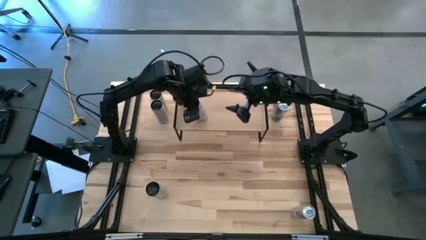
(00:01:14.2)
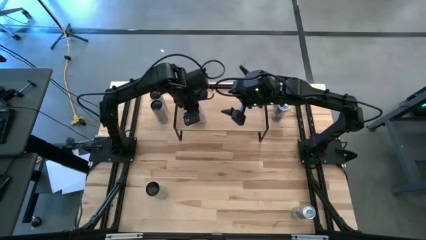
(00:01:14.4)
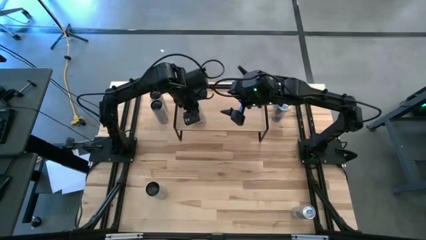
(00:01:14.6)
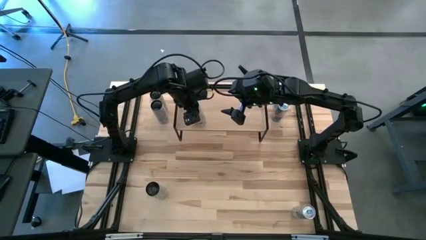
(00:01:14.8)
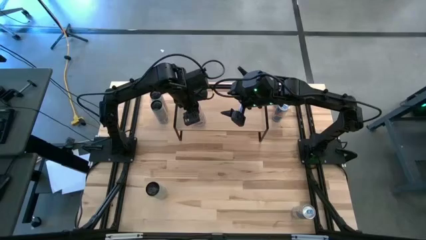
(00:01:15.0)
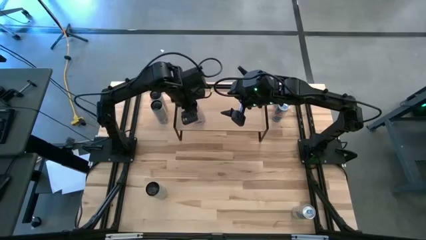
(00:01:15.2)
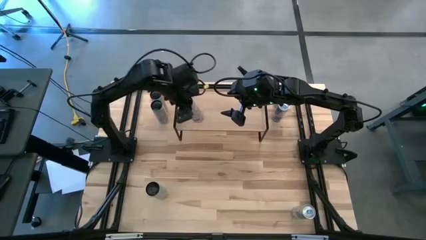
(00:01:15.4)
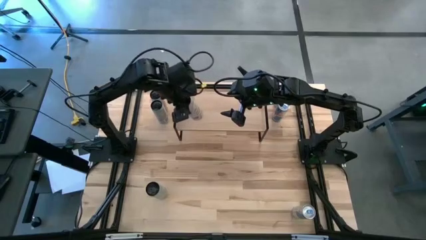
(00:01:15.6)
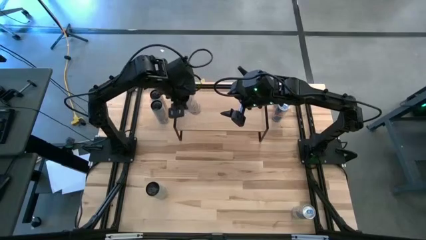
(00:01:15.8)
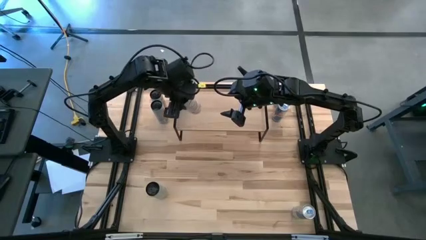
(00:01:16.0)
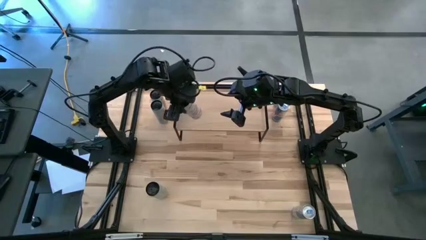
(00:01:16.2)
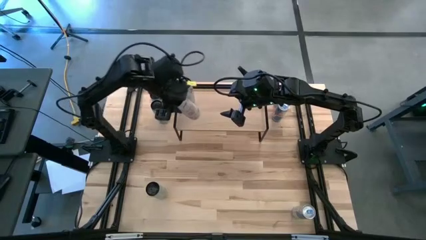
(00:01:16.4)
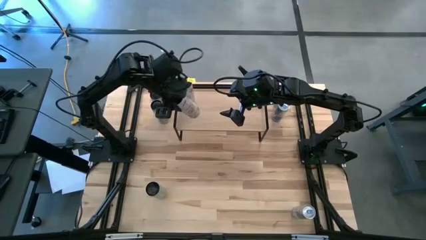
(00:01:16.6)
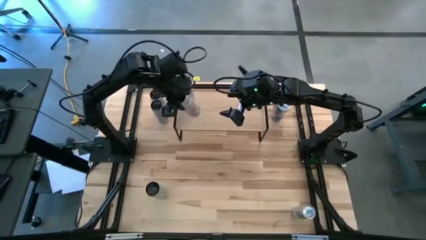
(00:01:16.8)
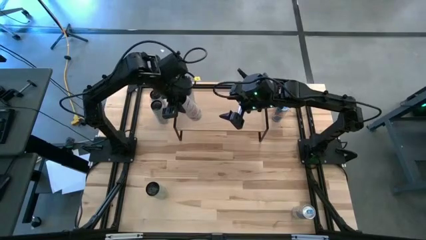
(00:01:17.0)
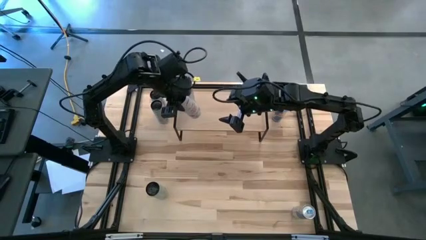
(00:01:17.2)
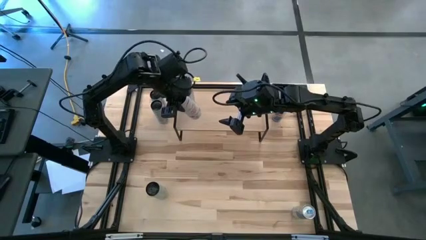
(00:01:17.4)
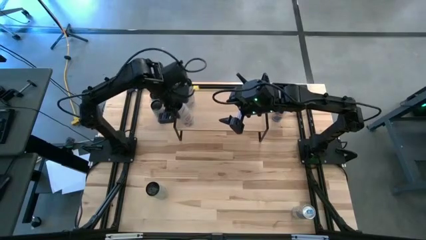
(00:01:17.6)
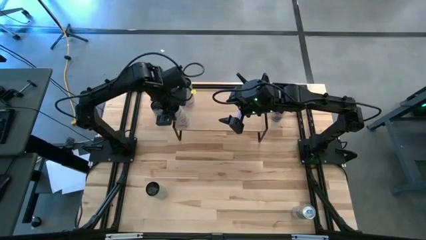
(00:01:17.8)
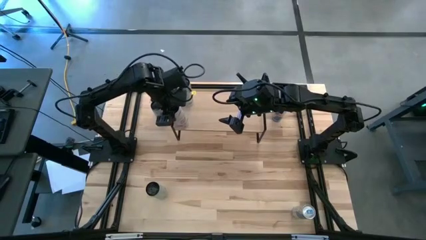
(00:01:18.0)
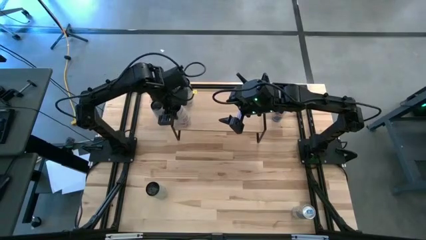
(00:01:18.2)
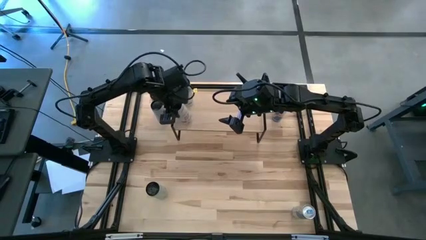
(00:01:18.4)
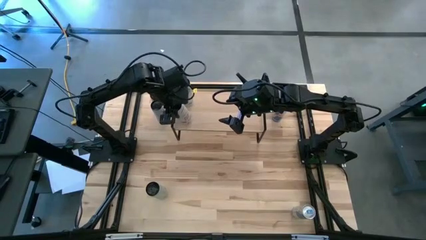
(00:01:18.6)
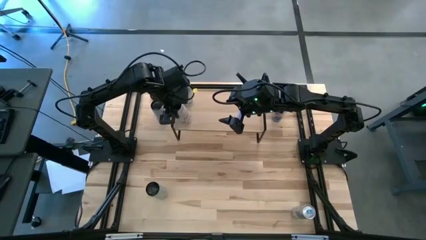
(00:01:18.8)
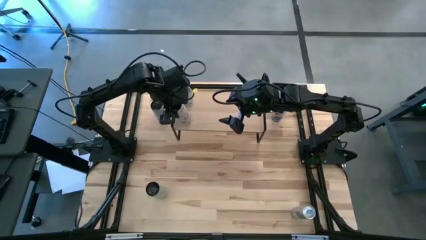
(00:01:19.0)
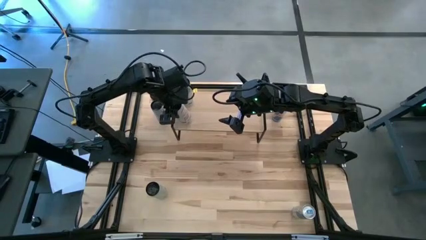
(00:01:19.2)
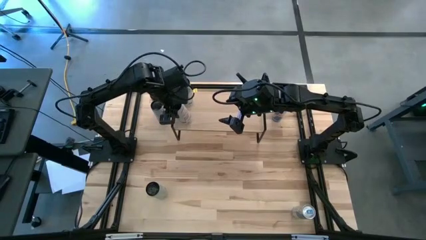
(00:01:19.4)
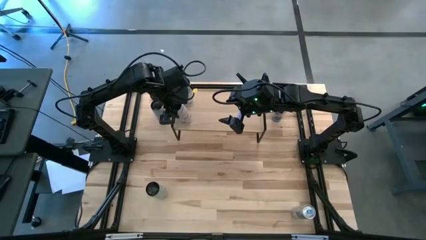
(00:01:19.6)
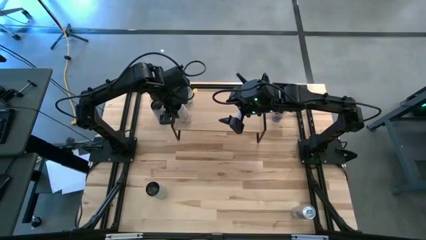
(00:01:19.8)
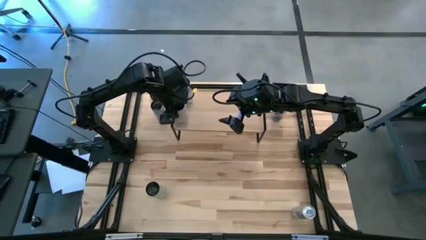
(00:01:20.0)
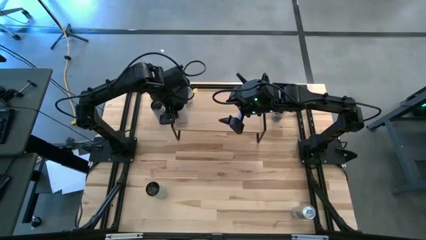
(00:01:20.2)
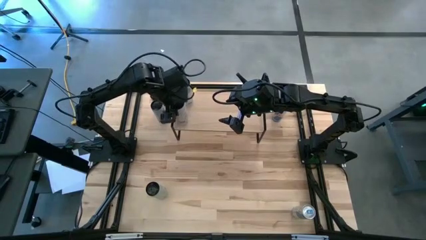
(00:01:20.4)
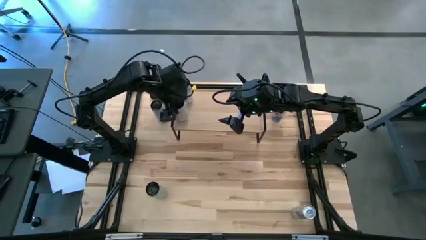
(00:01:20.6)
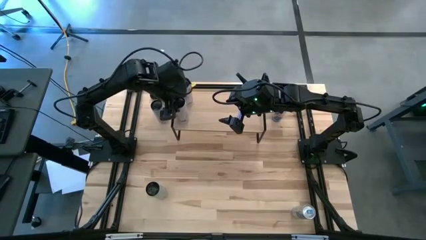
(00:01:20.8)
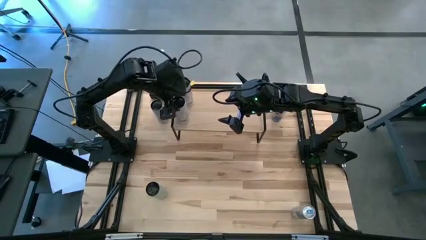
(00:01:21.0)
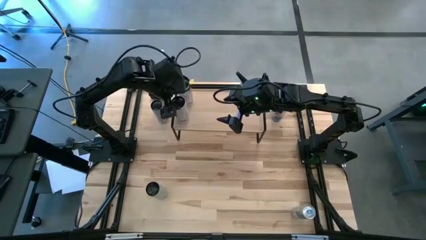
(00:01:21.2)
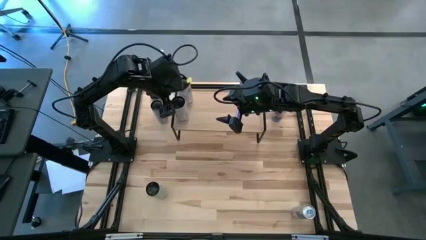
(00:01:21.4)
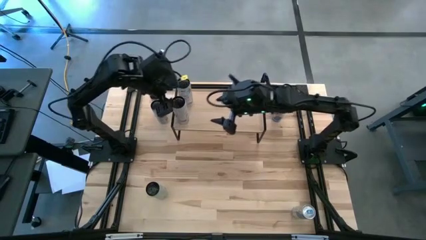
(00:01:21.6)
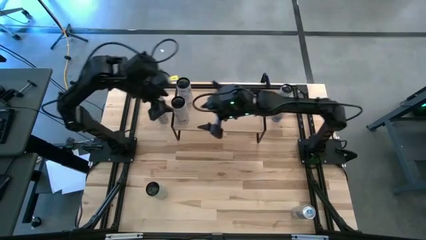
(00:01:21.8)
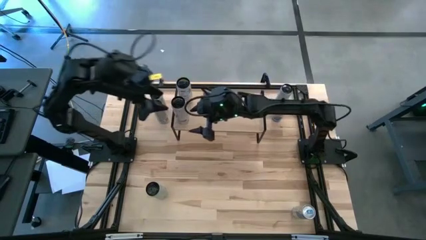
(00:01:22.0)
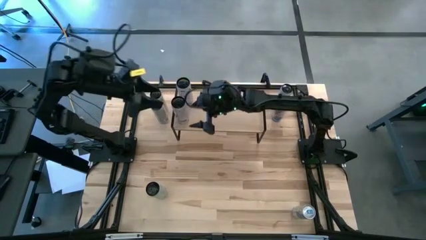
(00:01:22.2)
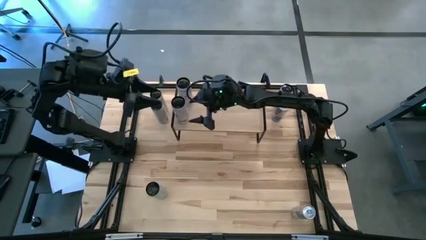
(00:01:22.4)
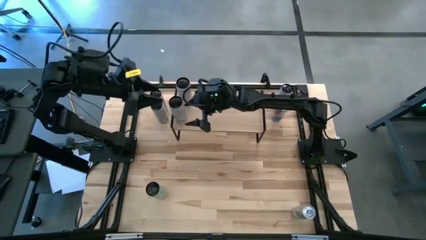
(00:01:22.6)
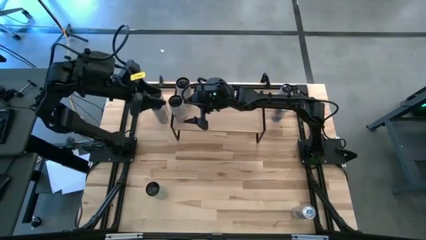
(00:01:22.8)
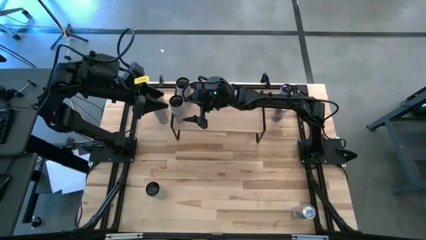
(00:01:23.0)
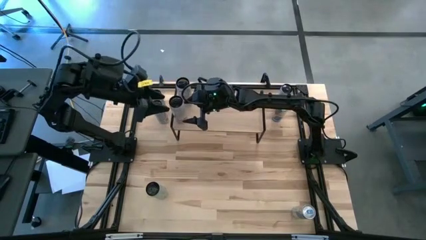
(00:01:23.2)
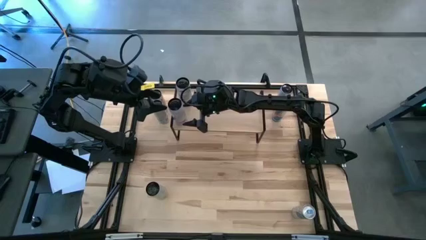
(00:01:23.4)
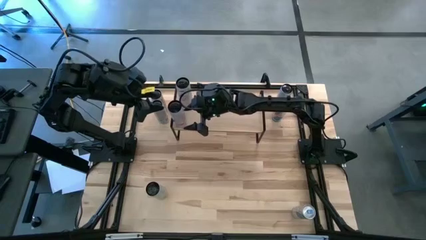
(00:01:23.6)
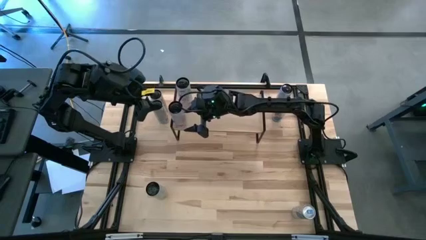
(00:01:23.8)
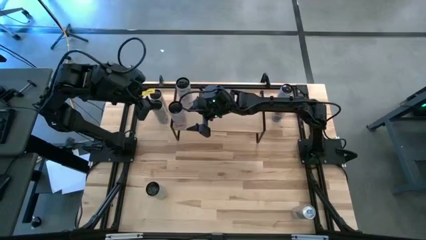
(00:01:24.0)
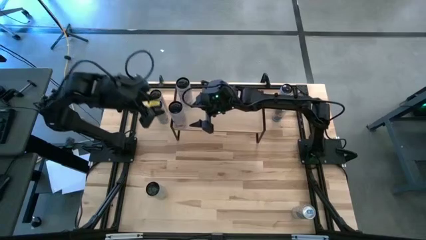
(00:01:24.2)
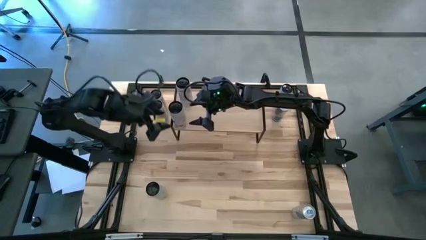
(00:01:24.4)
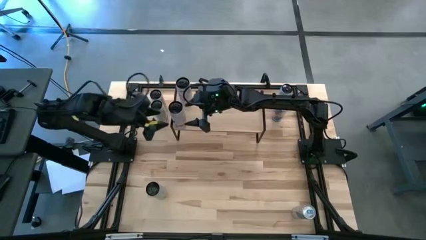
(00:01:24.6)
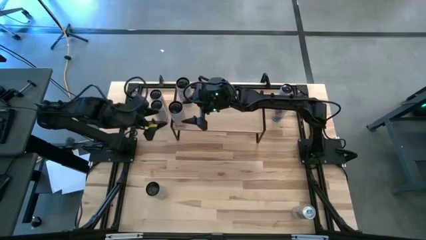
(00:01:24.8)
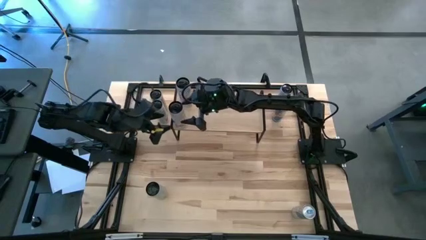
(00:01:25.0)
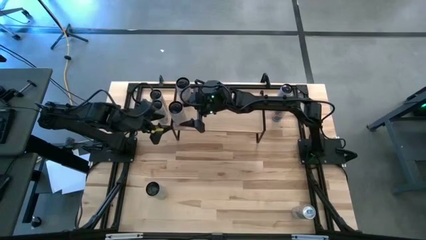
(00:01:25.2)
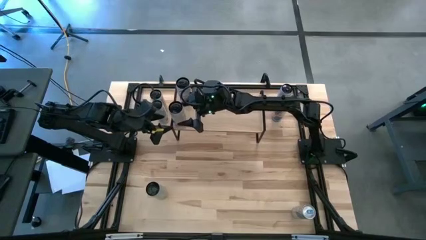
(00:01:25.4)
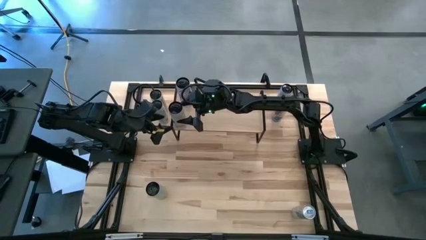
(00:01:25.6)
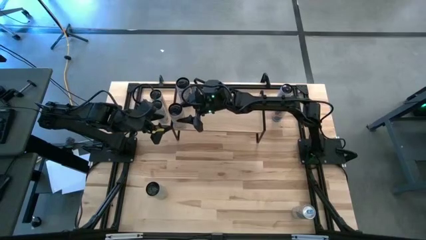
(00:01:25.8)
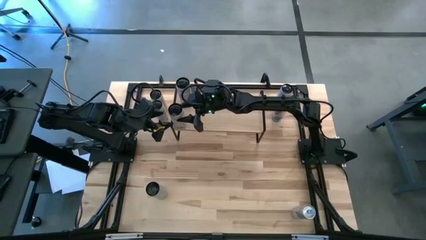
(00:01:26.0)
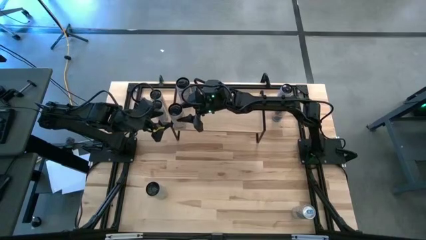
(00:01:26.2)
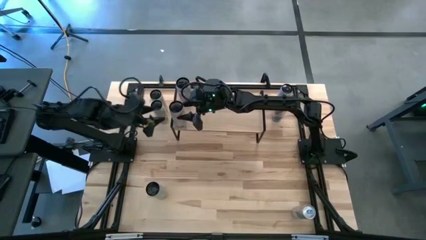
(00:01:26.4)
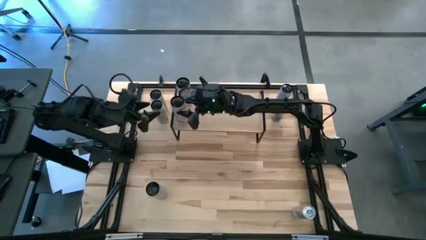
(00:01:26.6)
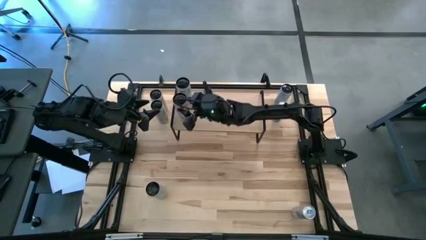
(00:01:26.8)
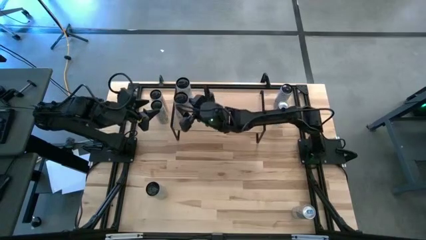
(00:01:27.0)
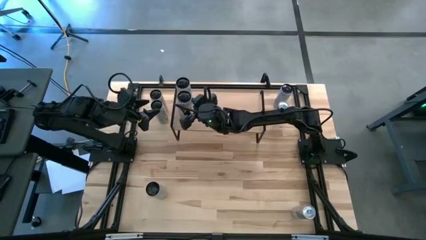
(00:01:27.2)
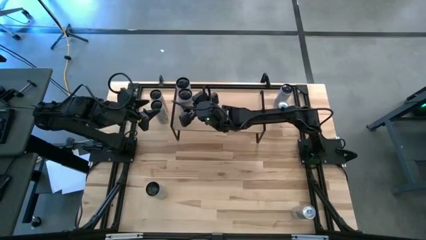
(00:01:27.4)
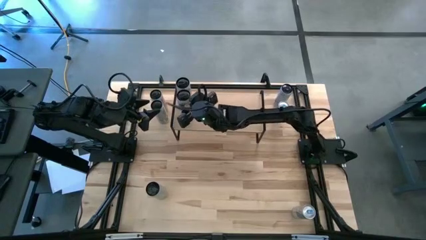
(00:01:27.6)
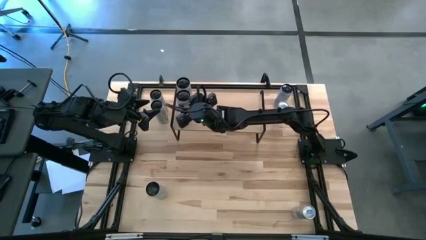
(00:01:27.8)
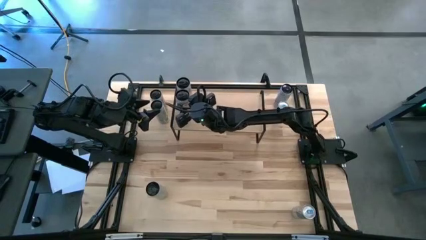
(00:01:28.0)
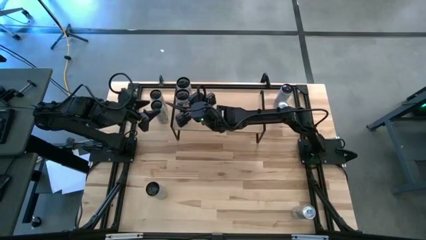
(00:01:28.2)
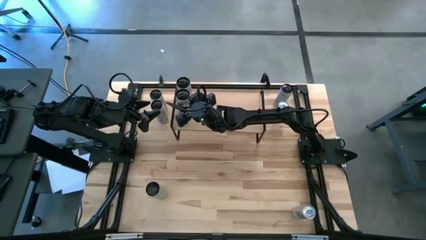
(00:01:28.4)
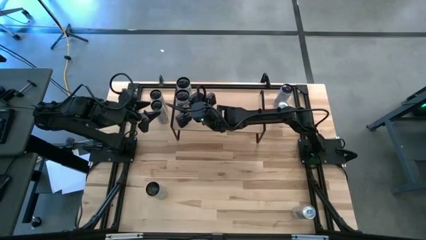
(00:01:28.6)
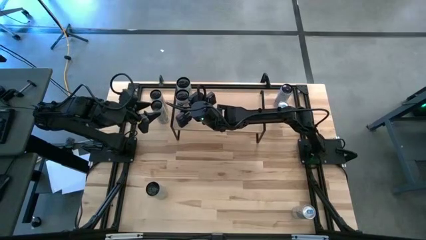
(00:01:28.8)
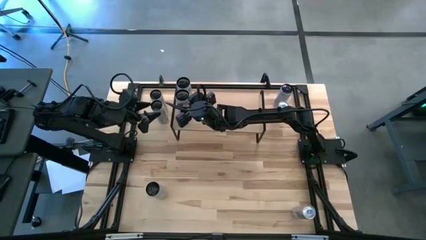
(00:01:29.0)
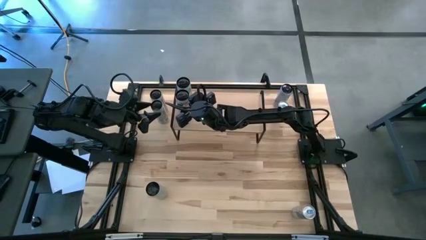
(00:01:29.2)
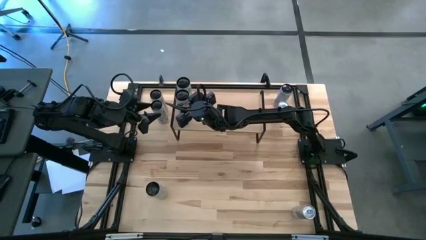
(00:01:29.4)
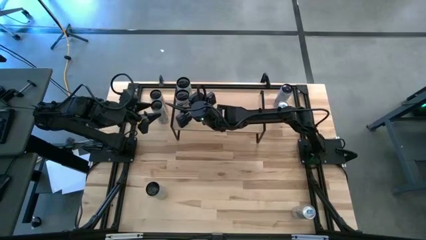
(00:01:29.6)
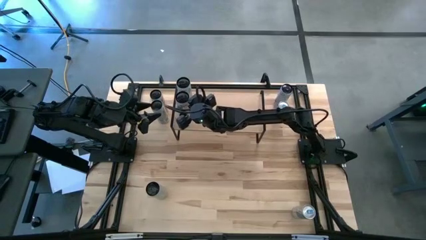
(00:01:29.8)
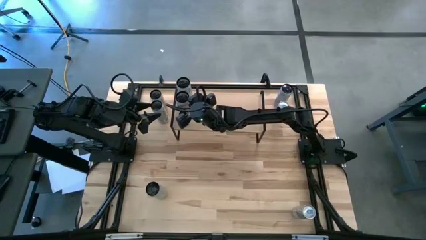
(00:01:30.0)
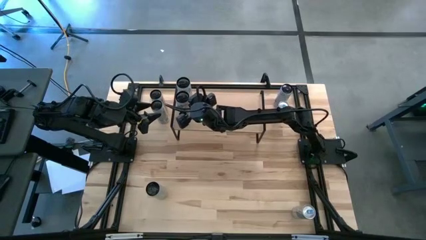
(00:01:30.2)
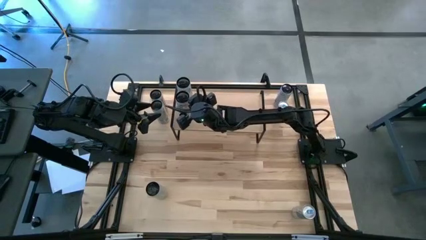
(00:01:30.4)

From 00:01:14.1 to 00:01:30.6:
Task: Place canned beverage on shelf
Put the white pink soda can on the shelf aligned with the other white pink soda can
